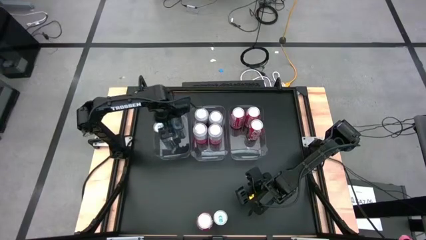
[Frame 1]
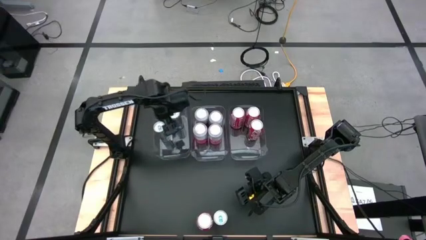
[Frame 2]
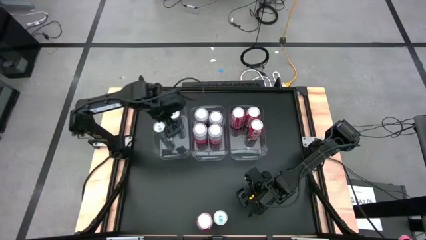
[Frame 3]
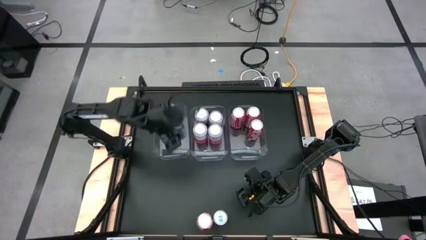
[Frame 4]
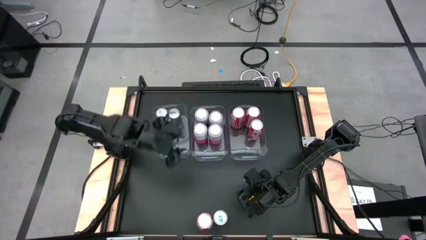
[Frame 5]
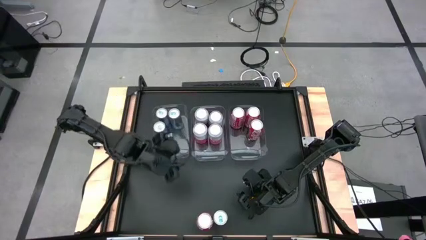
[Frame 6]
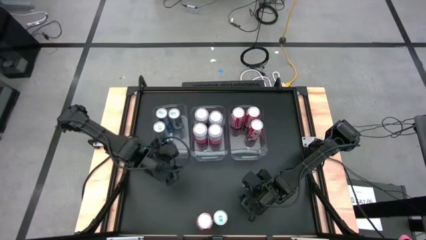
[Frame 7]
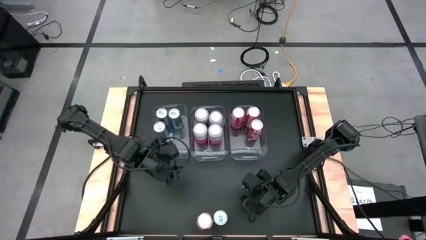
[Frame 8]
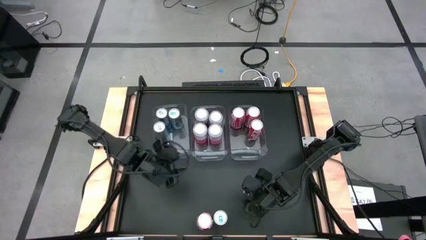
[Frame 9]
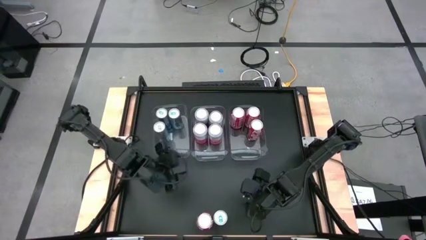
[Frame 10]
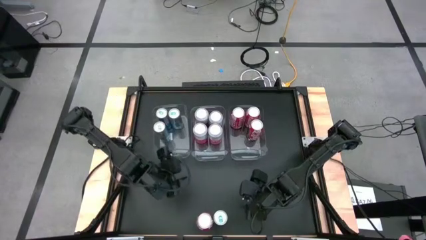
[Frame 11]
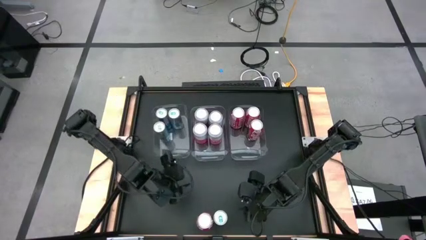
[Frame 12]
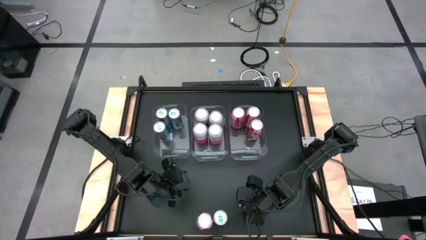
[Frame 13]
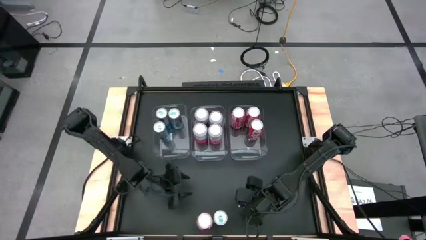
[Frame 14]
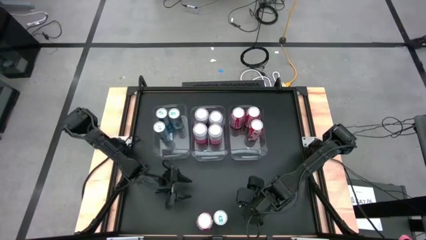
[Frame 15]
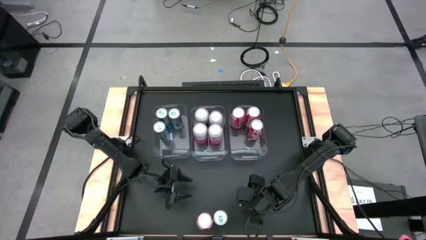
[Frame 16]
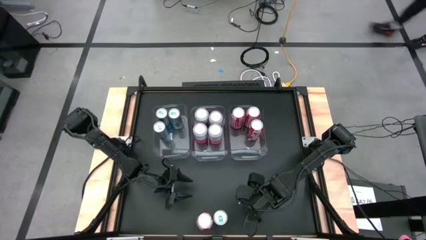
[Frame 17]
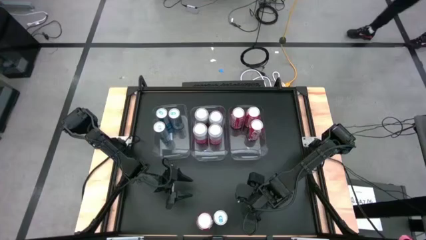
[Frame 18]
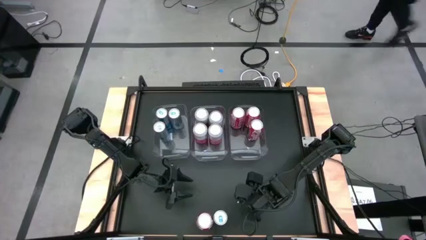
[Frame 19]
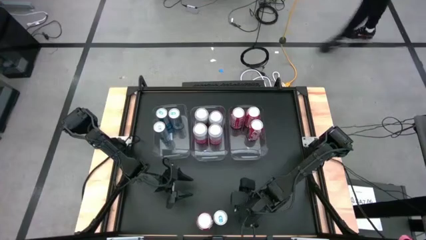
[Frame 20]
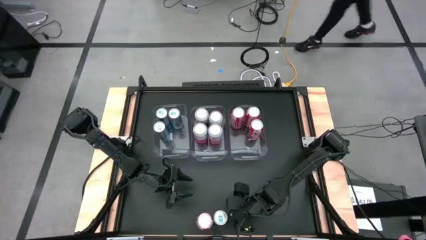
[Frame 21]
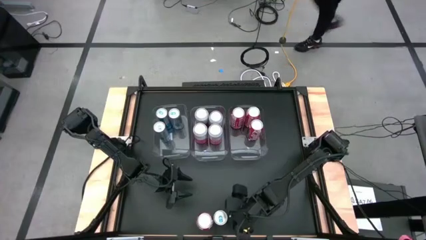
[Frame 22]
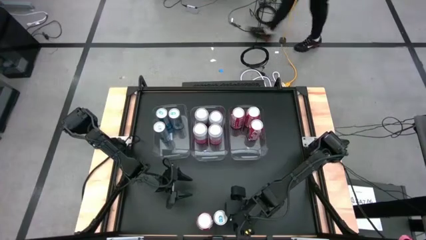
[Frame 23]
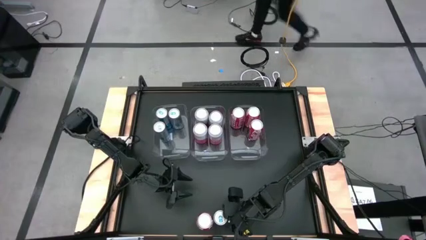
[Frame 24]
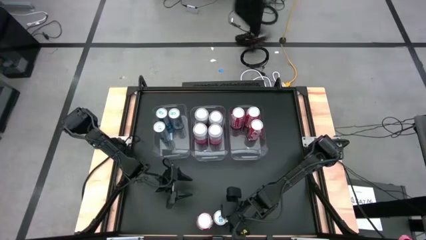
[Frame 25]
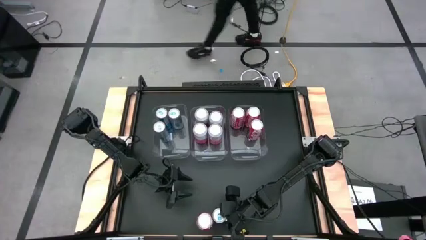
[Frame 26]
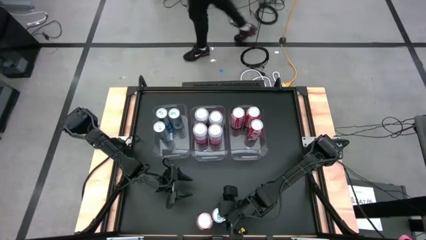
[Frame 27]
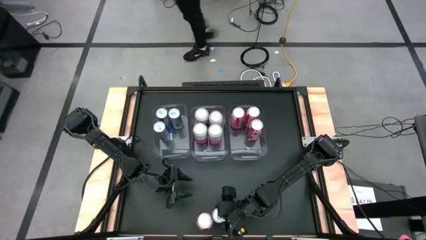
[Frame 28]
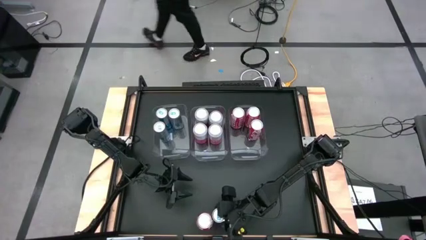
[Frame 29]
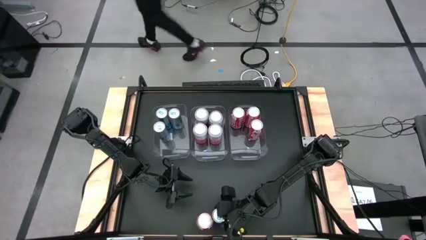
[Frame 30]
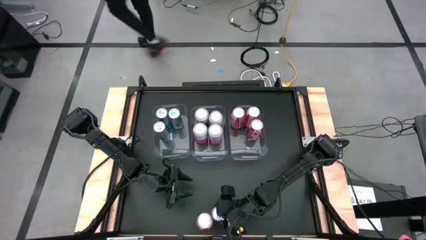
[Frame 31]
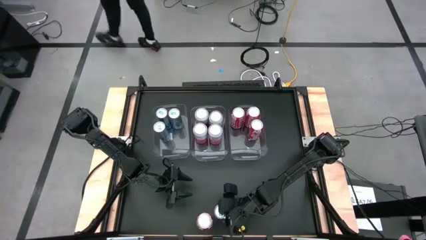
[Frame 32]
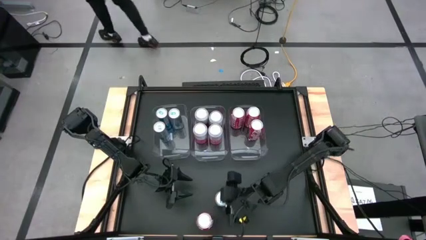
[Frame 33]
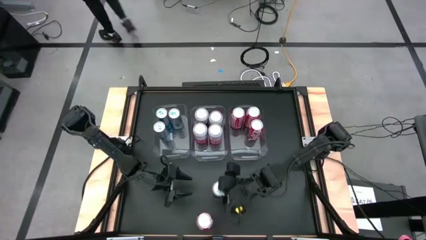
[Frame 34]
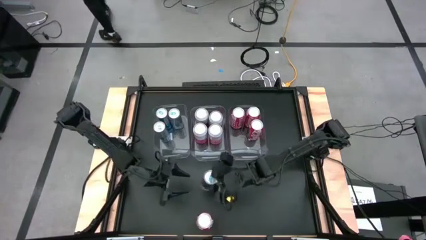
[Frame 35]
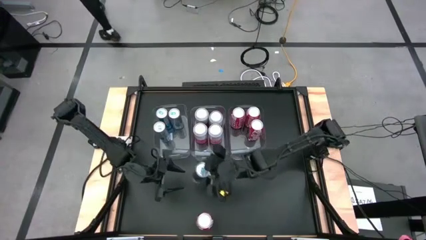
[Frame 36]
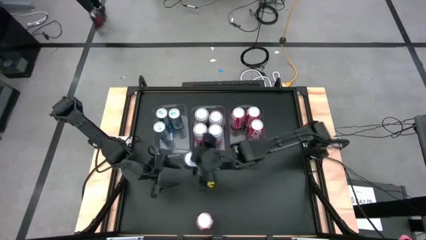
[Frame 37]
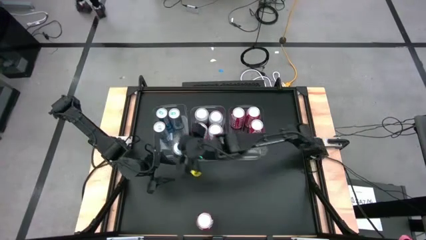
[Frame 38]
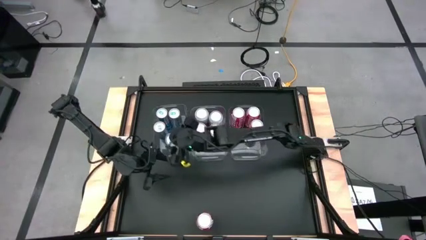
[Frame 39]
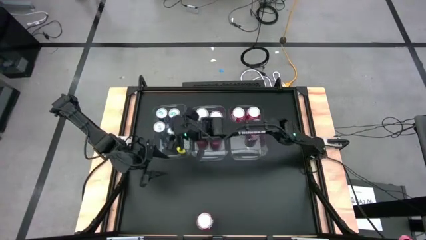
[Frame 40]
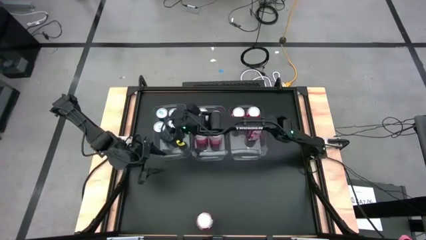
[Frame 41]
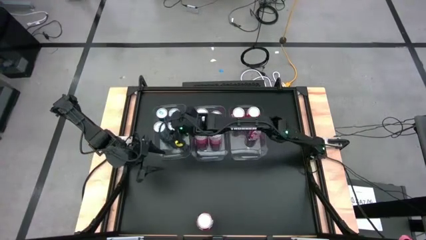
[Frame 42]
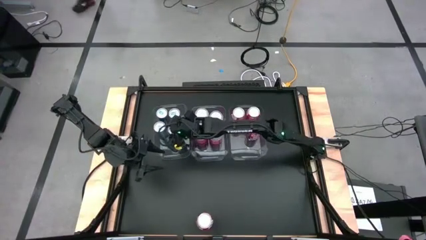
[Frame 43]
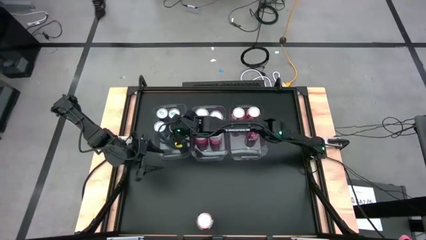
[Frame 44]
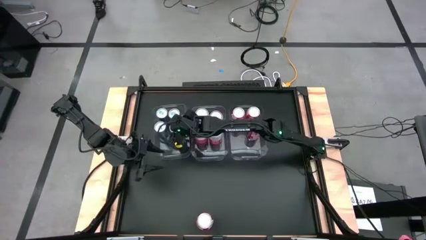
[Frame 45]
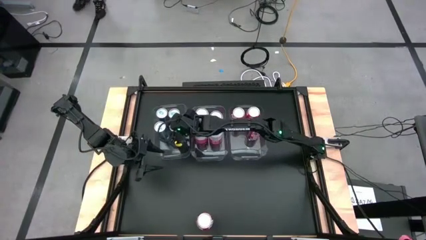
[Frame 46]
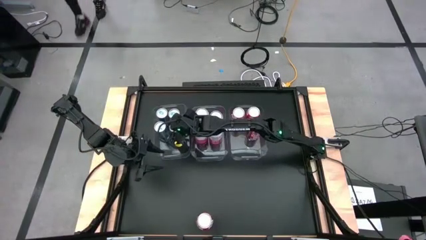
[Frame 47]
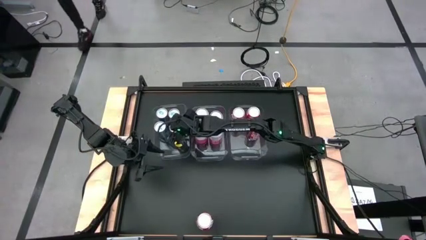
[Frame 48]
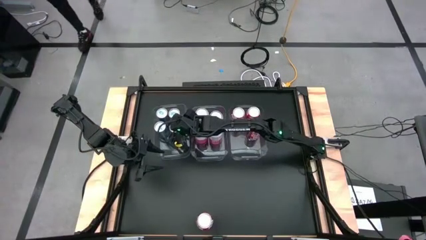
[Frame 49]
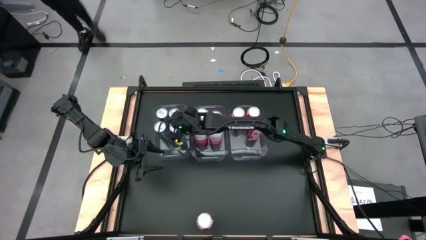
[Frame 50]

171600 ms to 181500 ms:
Task: Sort soda cans
Put the blue soda can into the left transparent bin

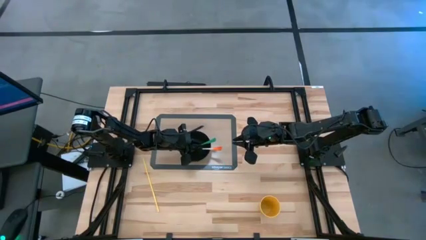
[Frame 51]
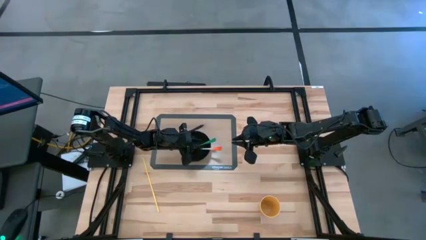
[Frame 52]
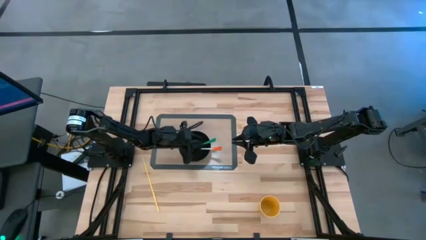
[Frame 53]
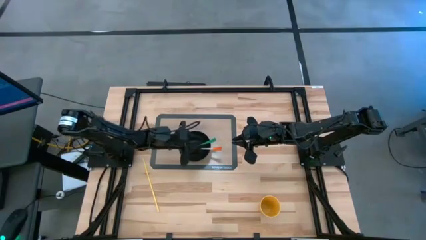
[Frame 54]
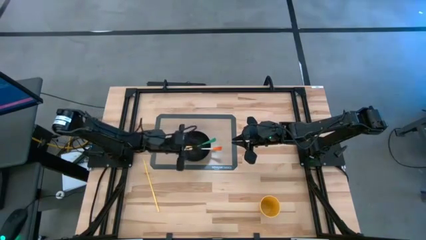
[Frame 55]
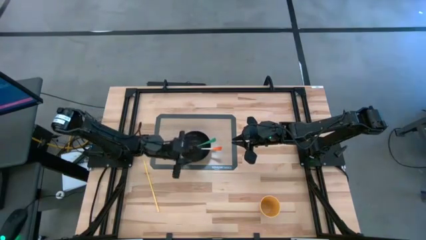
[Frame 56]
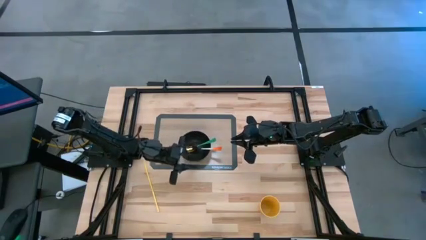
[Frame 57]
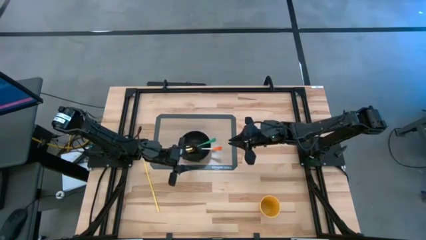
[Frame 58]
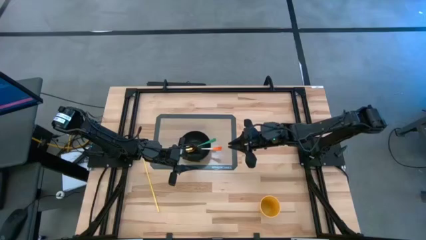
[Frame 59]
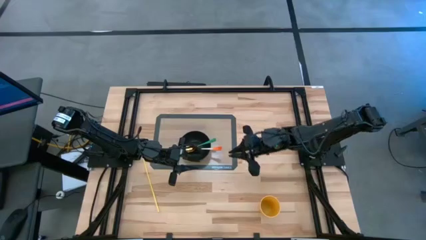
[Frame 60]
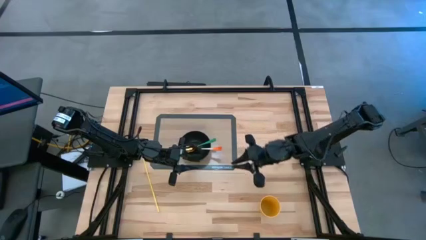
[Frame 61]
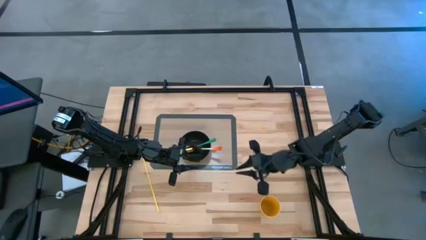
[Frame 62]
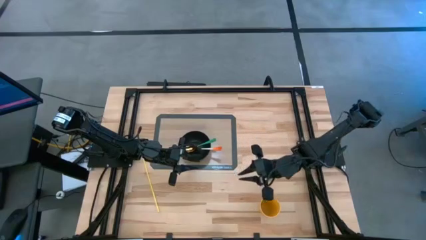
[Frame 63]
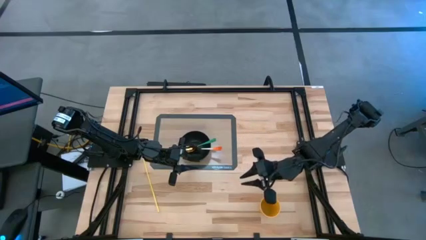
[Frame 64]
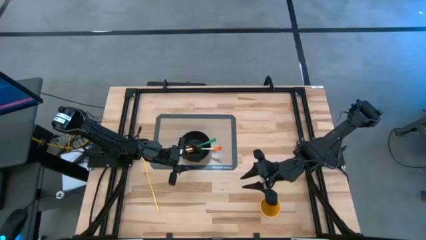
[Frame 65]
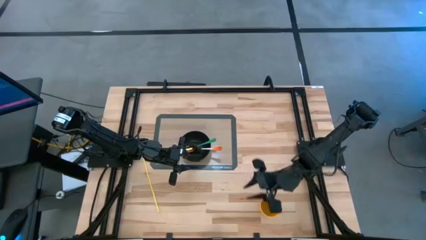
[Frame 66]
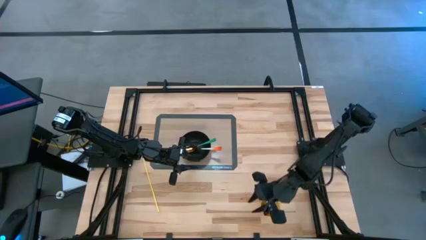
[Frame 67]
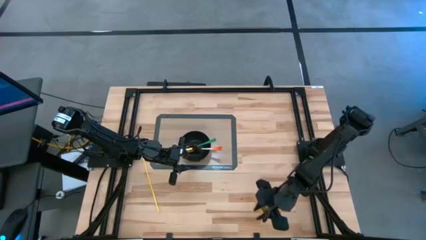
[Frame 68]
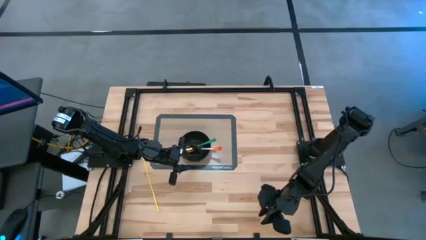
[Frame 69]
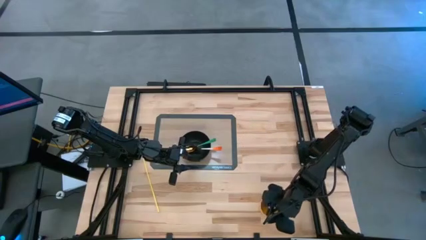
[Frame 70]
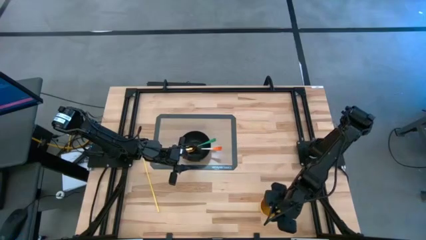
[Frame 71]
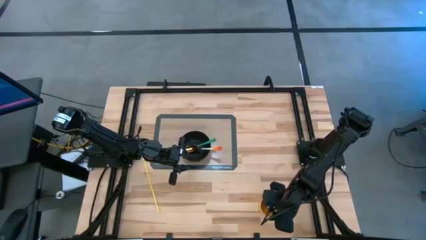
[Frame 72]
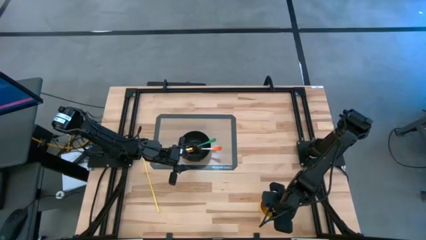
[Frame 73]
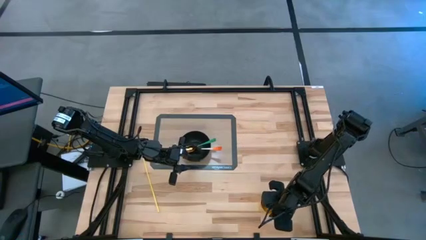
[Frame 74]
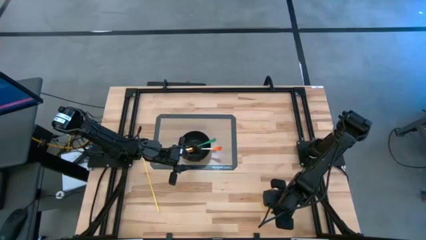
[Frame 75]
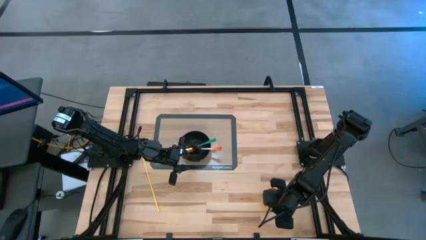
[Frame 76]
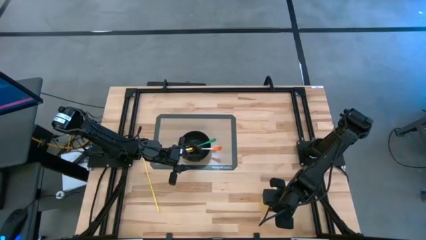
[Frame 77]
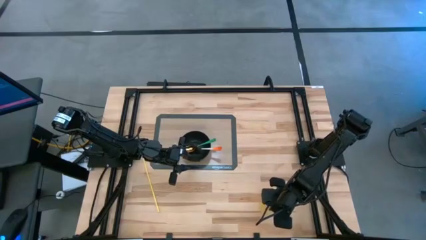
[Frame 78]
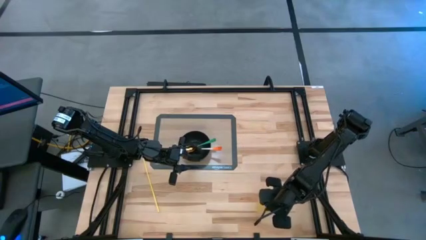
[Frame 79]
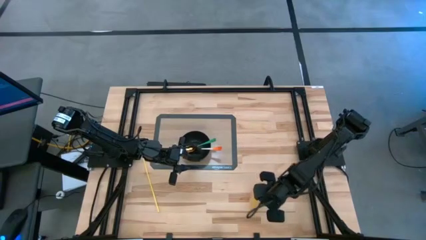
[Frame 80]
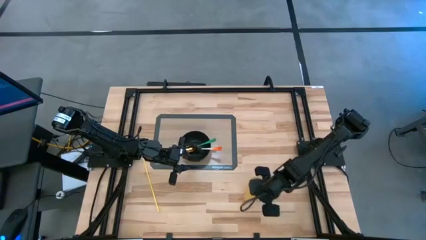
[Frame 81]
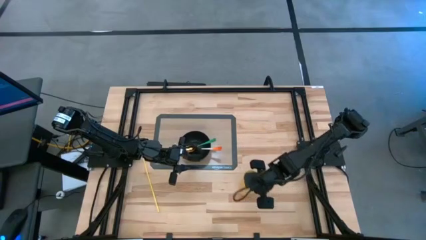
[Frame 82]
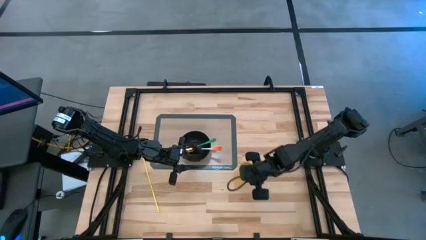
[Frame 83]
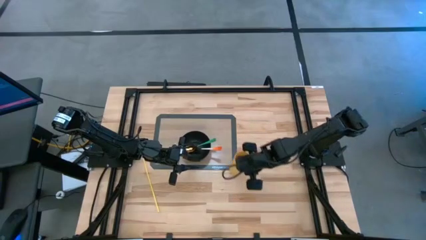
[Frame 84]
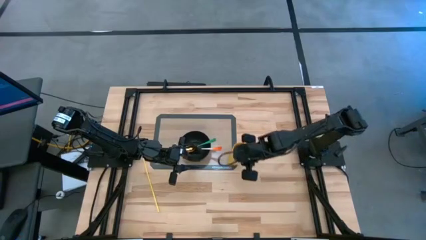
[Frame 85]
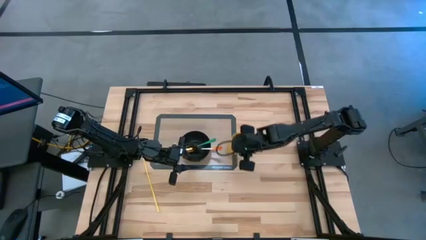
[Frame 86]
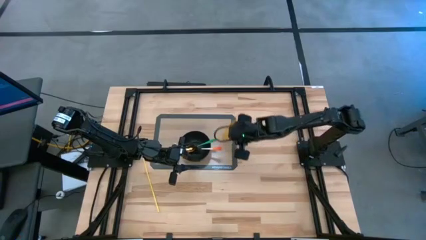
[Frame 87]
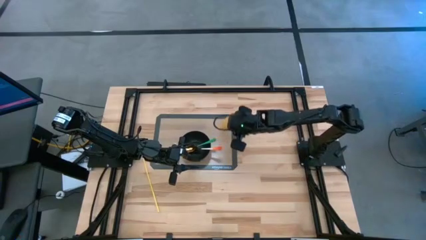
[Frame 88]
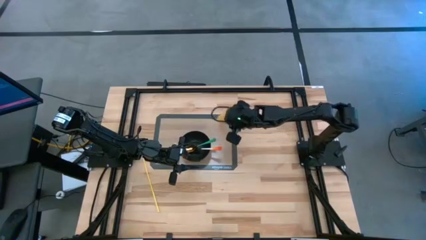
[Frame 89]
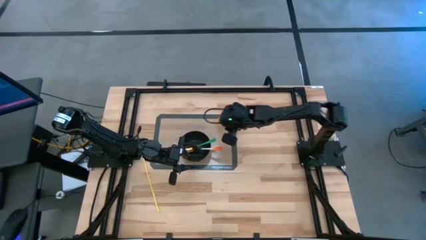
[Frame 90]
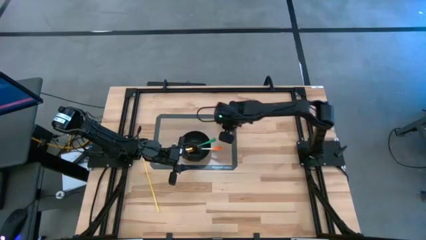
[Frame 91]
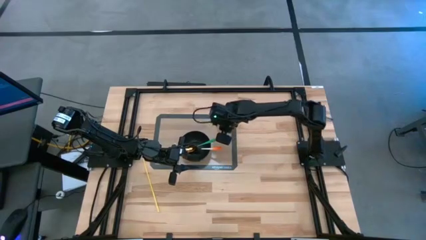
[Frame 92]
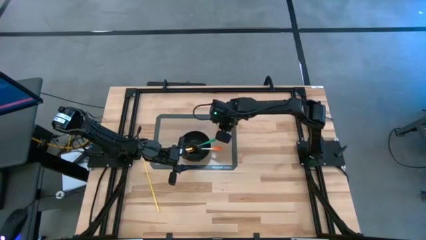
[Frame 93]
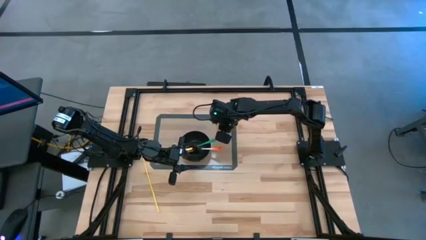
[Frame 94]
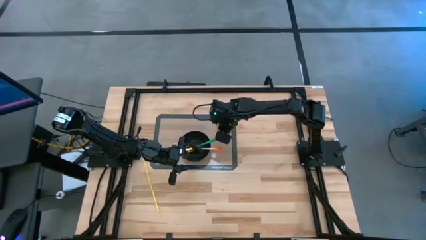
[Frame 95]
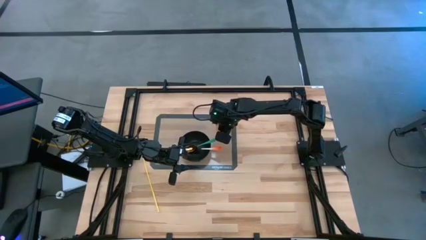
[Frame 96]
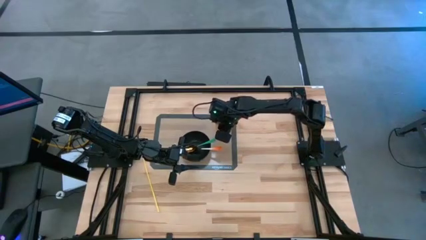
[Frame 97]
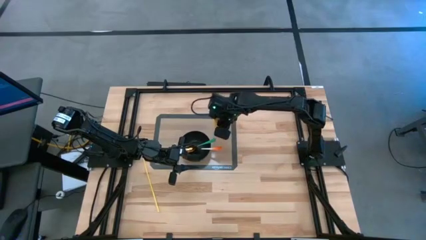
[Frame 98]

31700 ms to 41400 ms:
Task: Pick & Place Utensil
Put the yellow cup on the transparent mat to the top right of the black bowl
